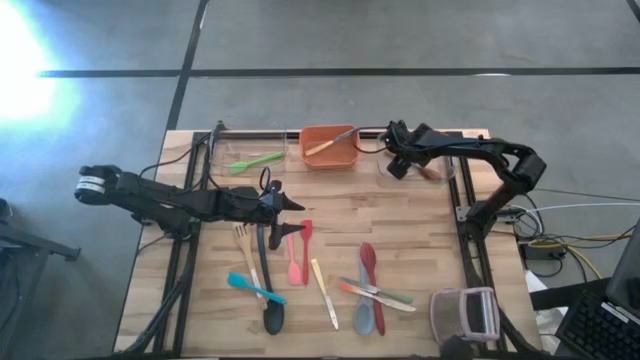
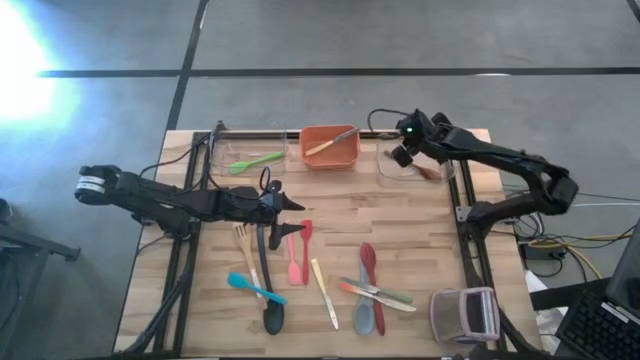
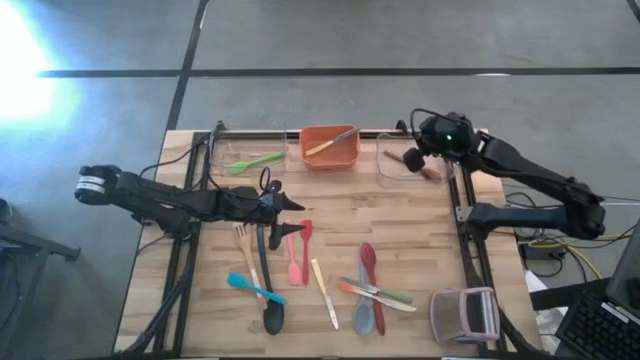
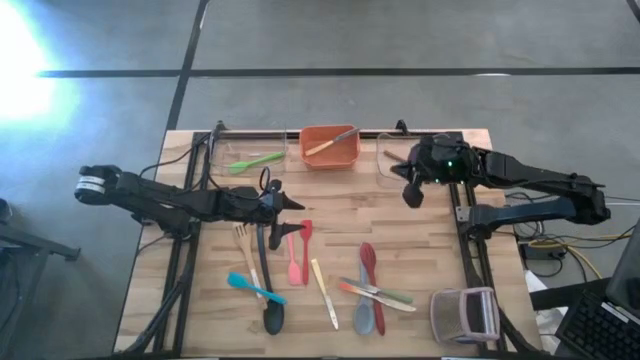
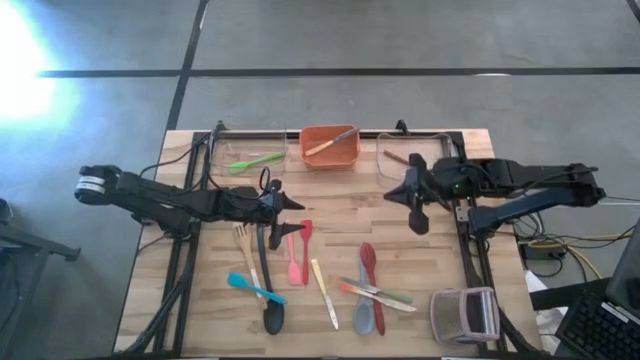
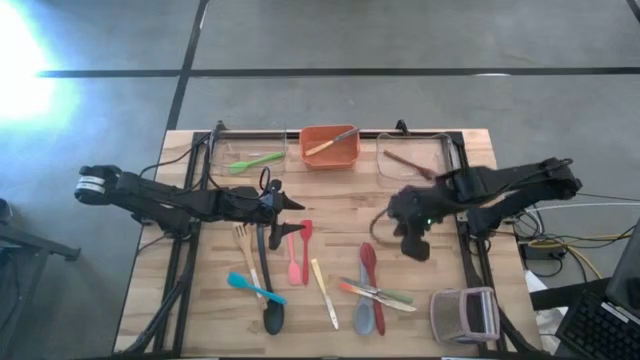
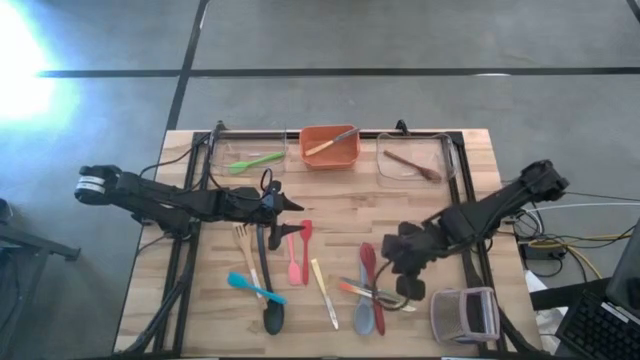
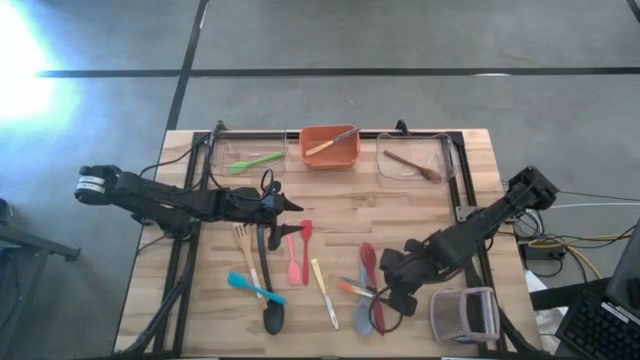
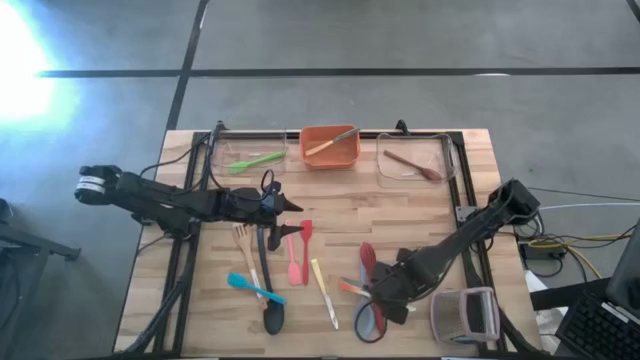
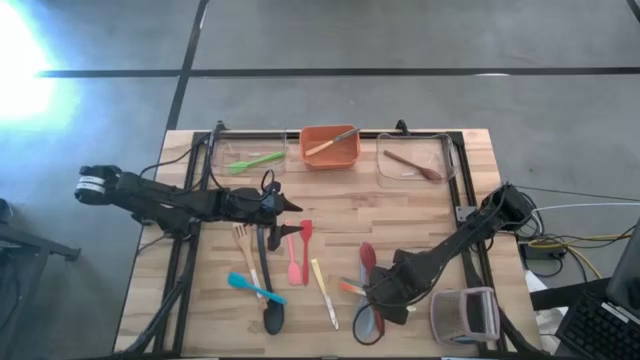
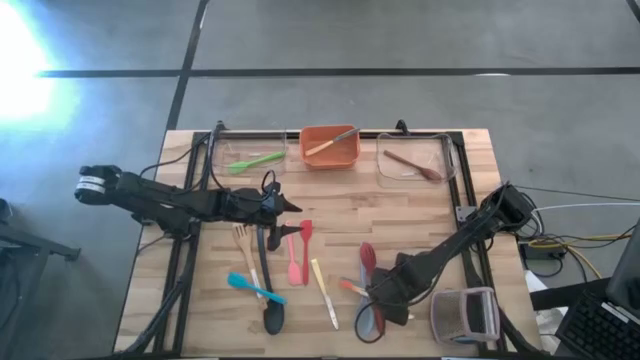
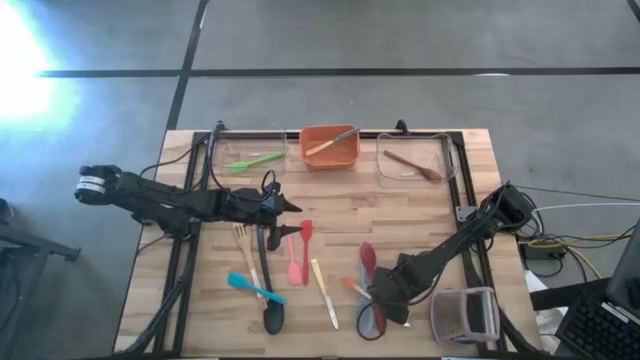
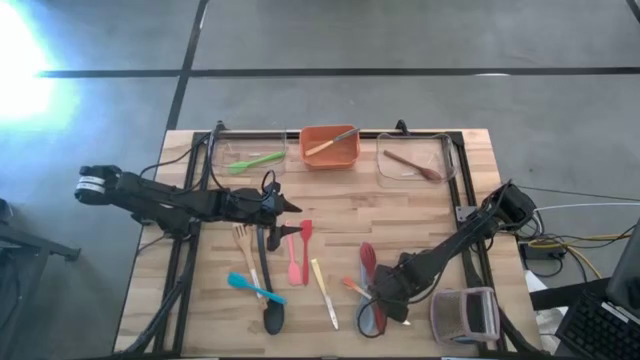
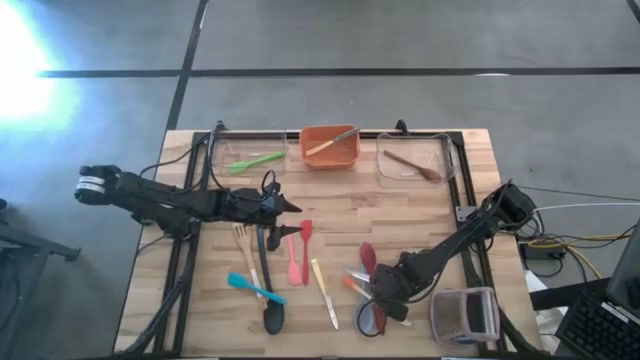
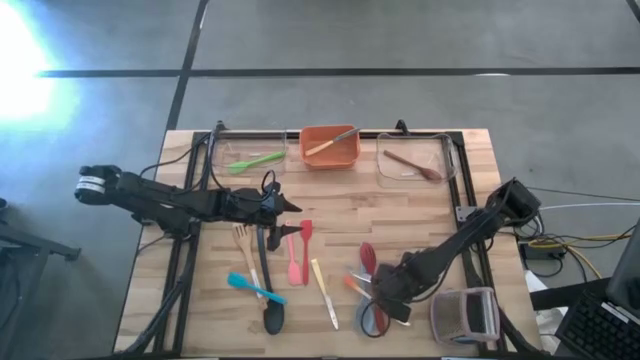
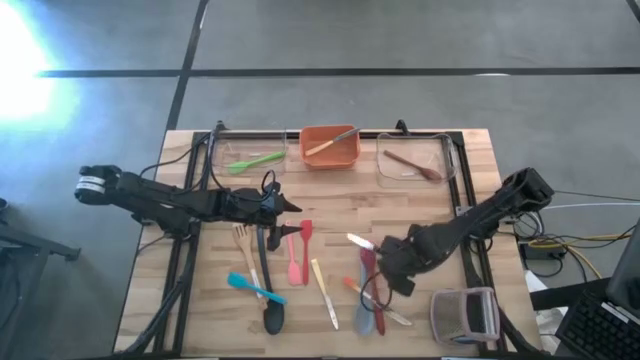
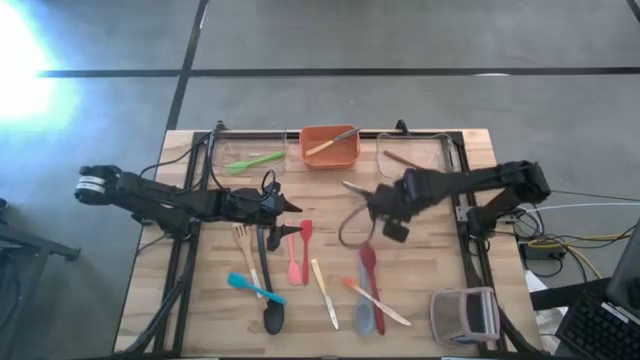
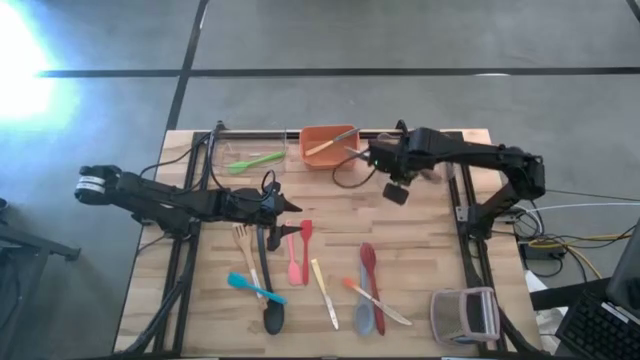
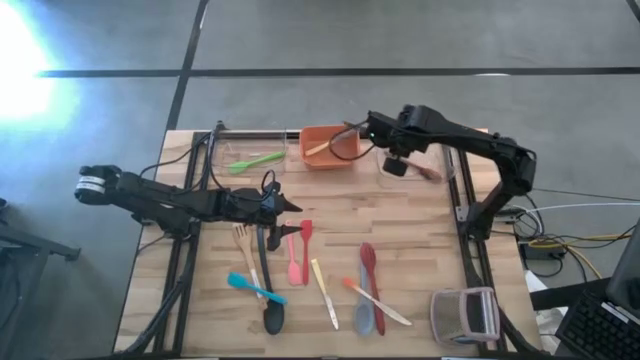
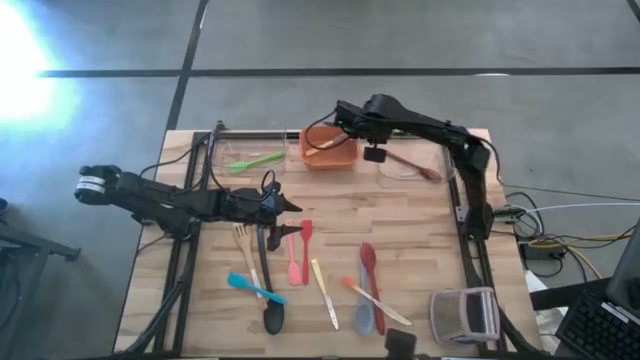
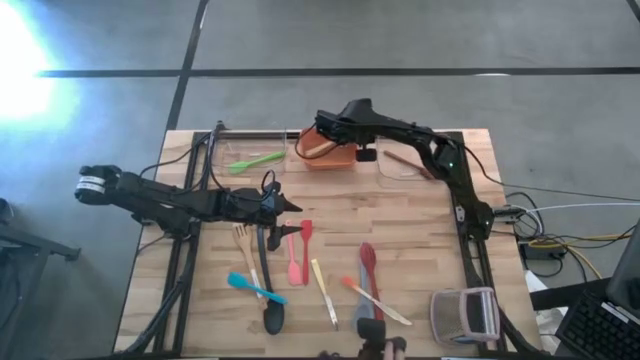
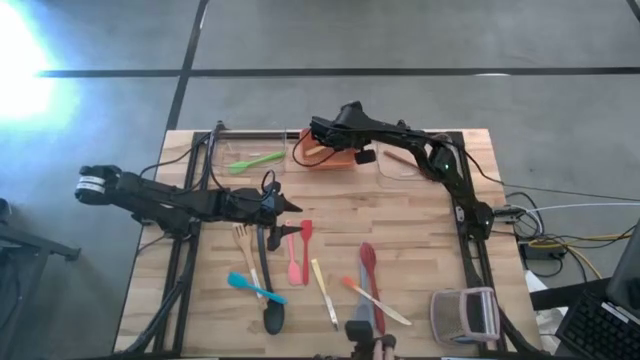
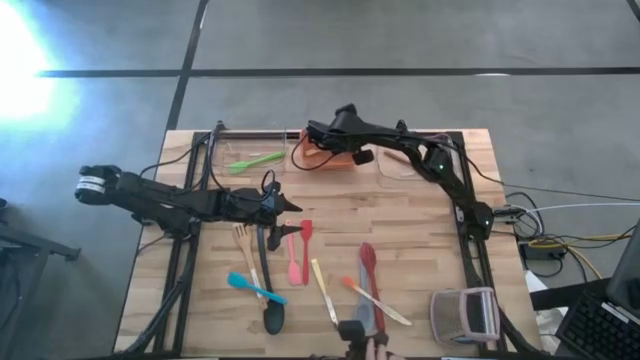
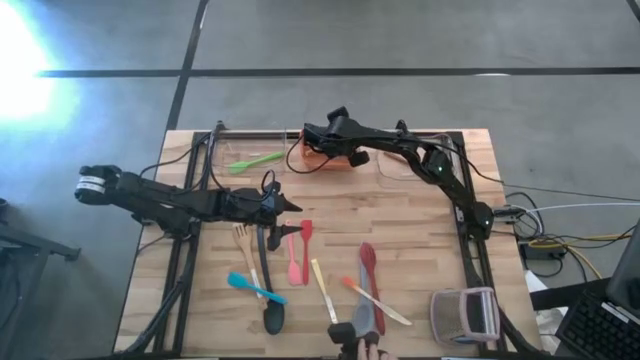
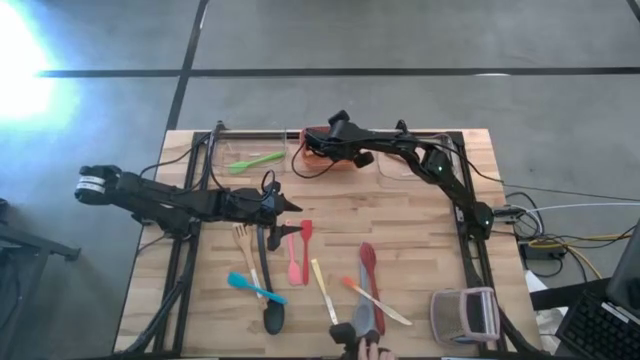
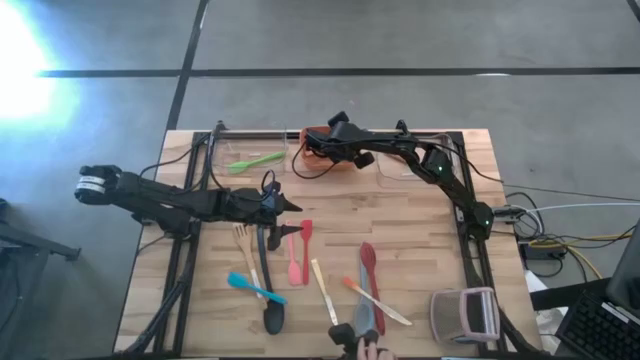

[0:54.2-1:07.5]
Task: Pick & Place Kitchen Items
Put the green knife into the orange bin

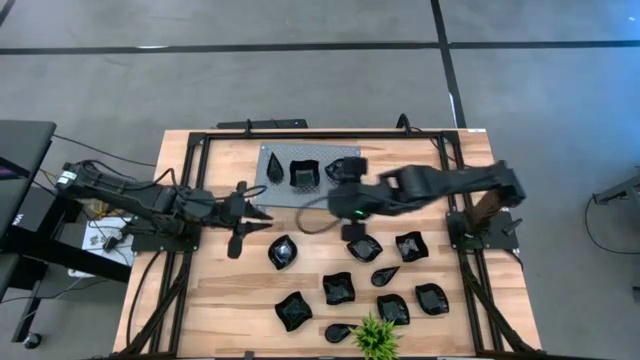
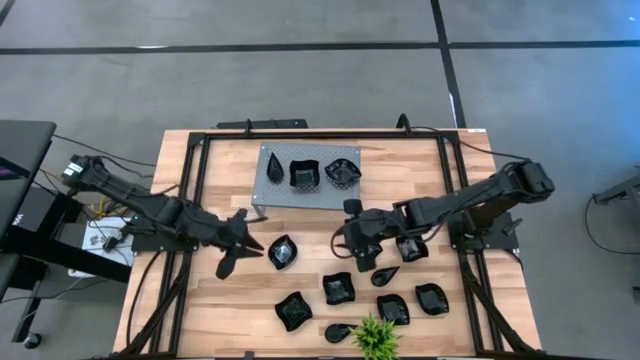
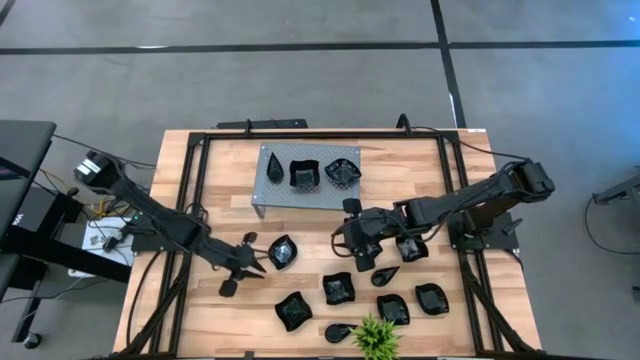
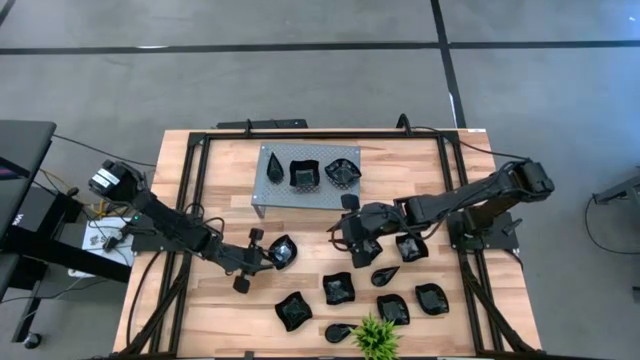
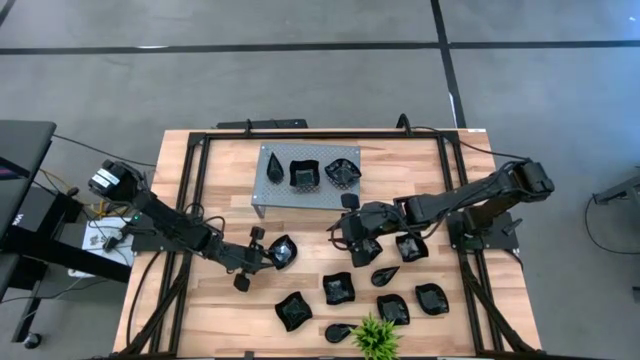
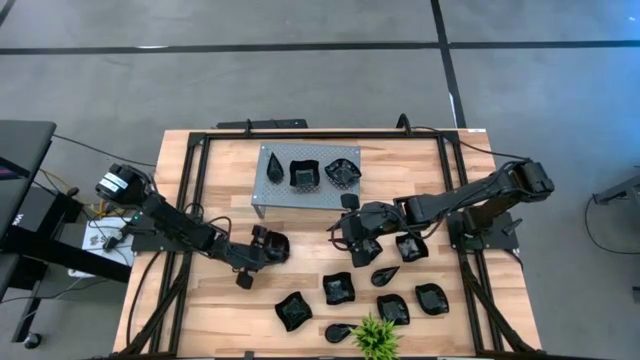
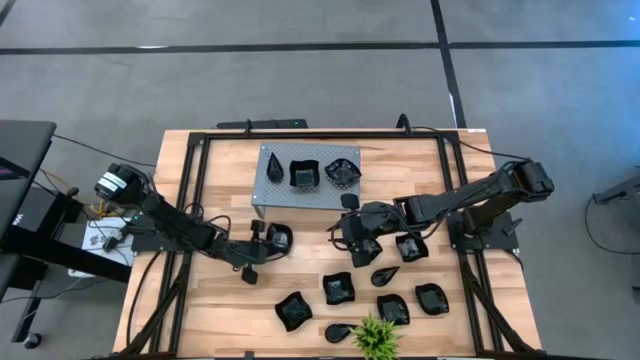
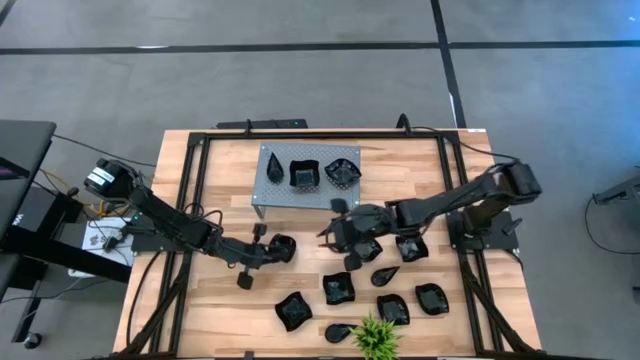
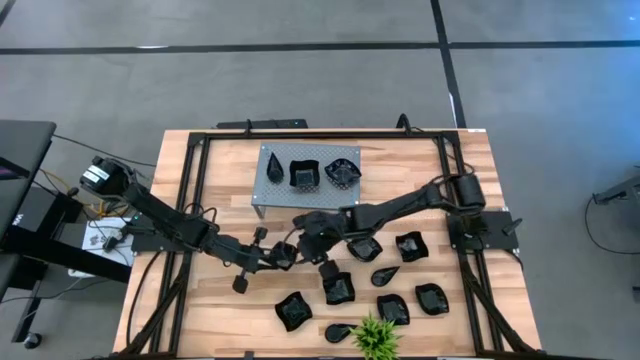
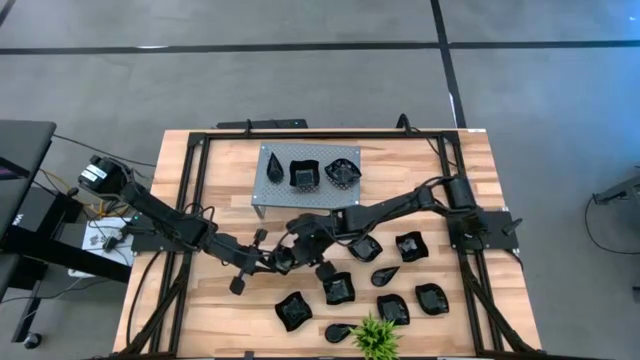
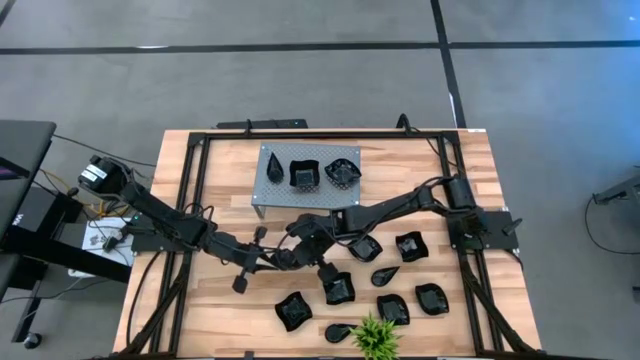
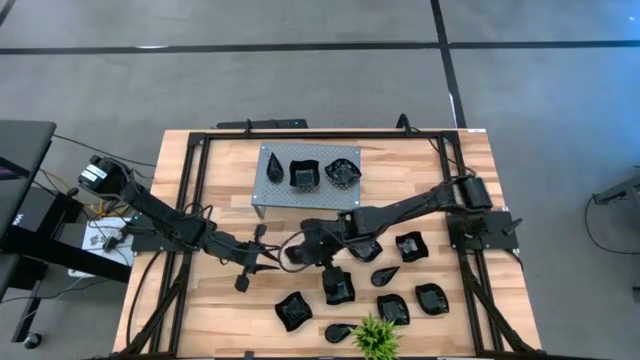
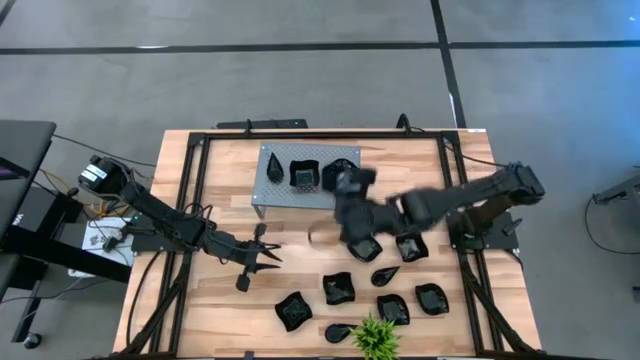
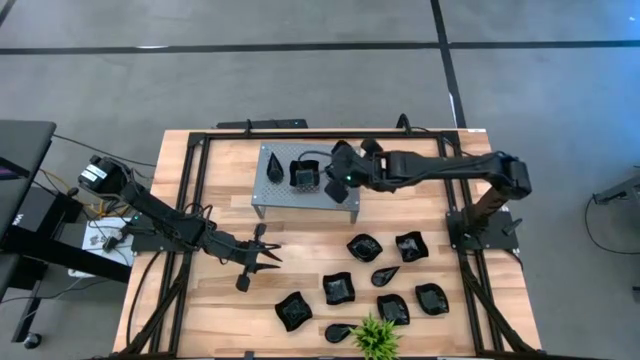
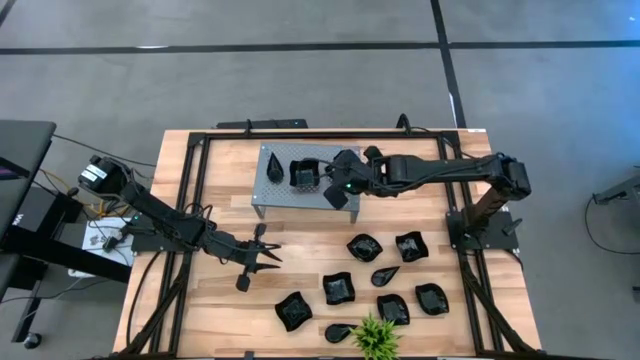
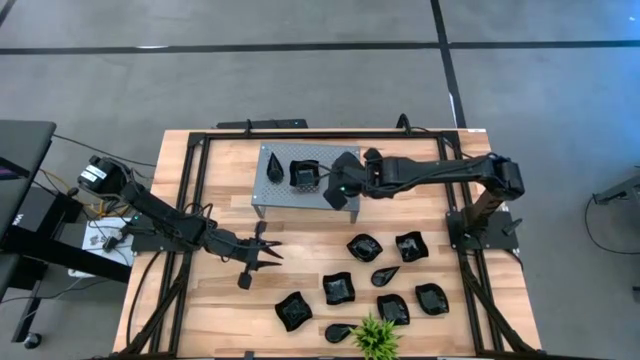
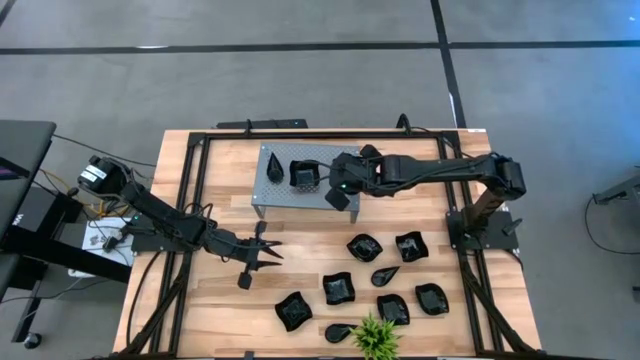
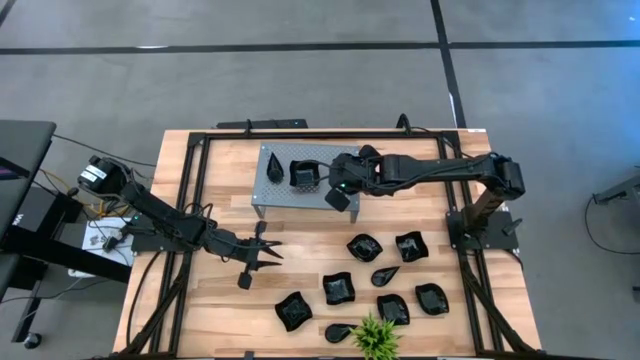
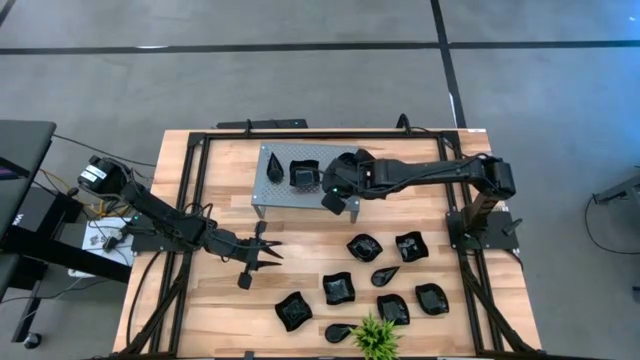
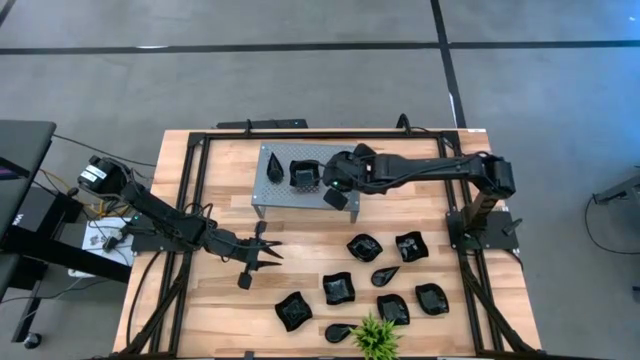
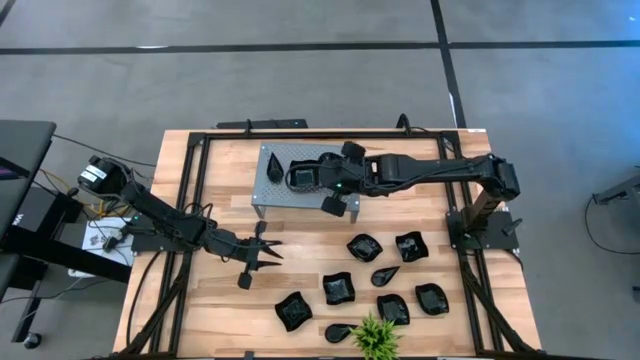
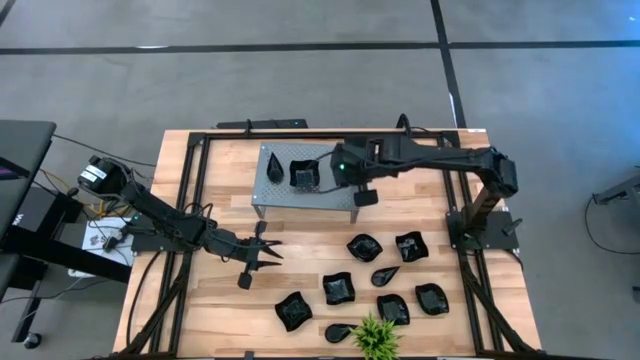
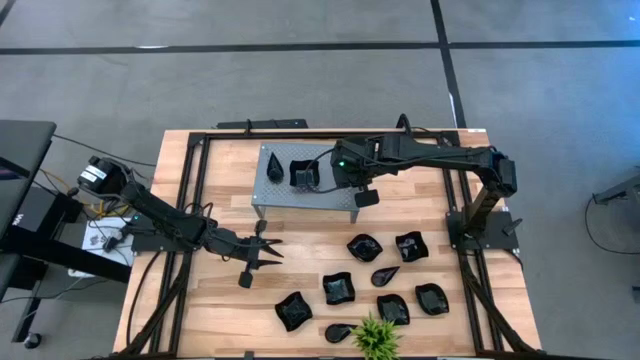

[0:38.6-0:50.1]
Task: Pick & Place Mini shaped plates
Stack the black leaf-shaped plate on top of the black leaf-shaped plate on the shelf
